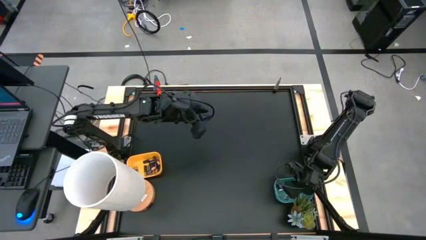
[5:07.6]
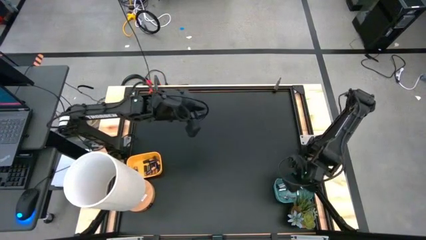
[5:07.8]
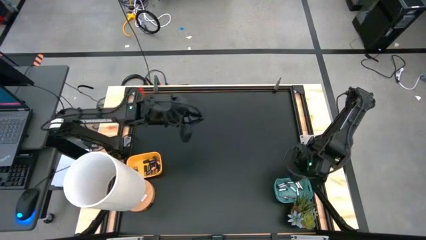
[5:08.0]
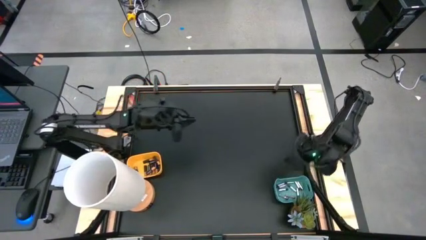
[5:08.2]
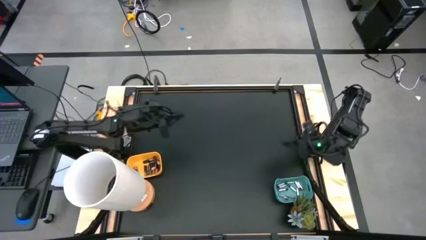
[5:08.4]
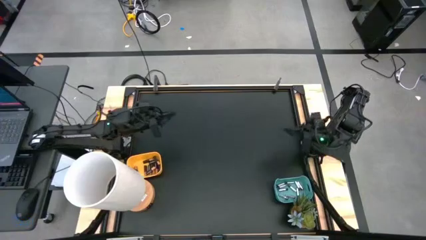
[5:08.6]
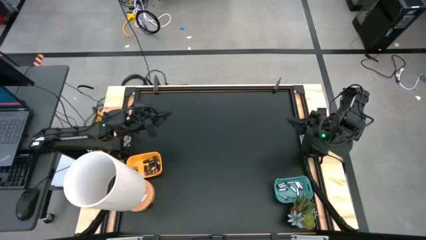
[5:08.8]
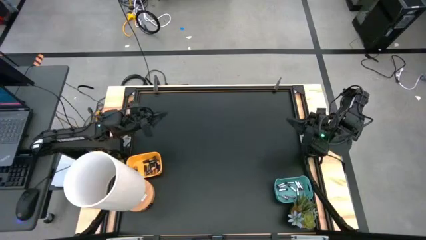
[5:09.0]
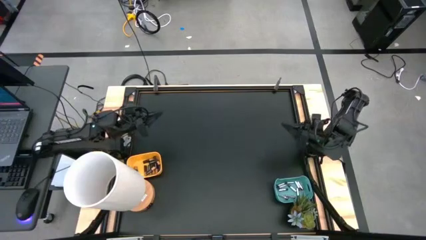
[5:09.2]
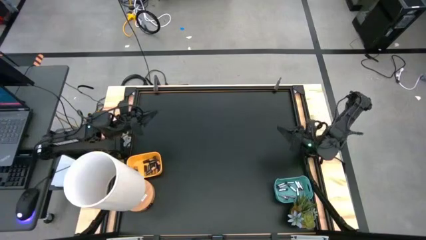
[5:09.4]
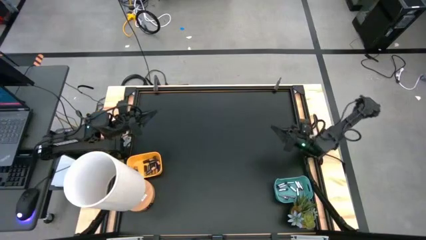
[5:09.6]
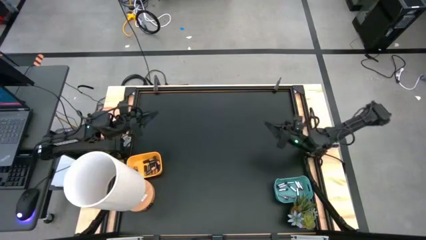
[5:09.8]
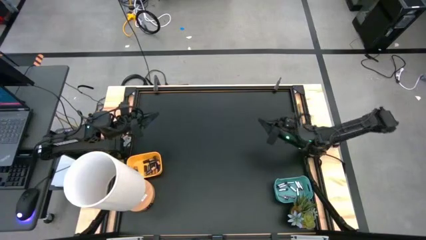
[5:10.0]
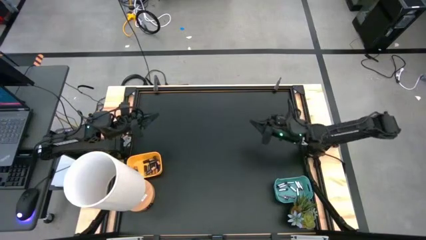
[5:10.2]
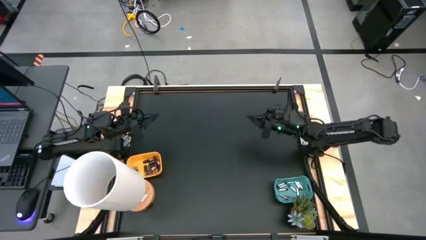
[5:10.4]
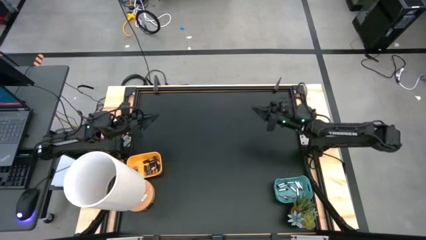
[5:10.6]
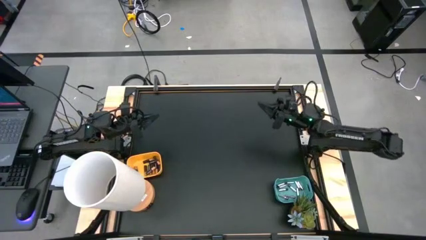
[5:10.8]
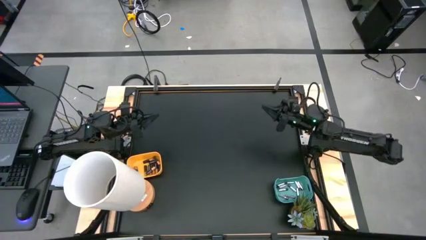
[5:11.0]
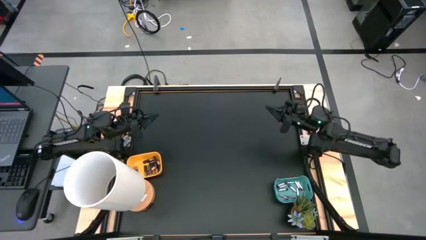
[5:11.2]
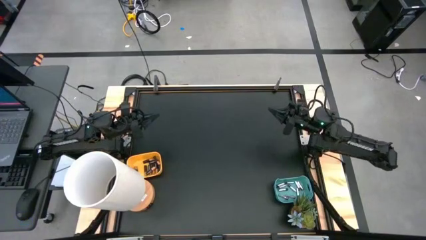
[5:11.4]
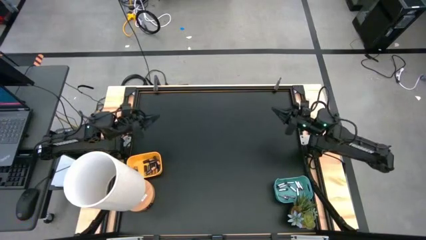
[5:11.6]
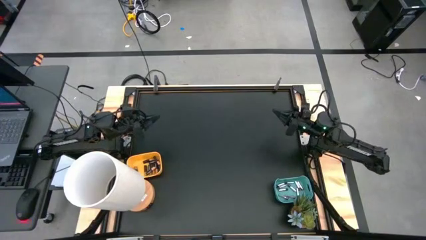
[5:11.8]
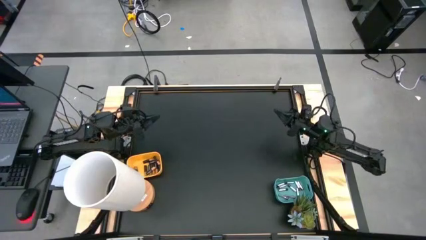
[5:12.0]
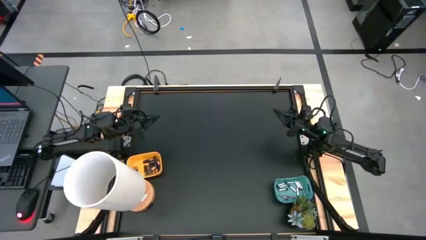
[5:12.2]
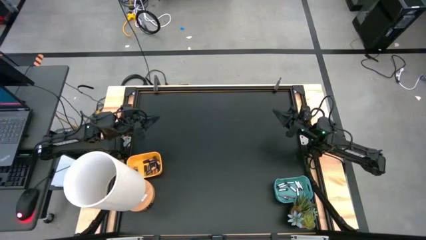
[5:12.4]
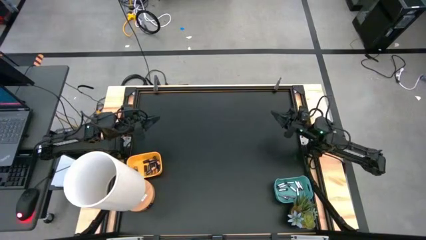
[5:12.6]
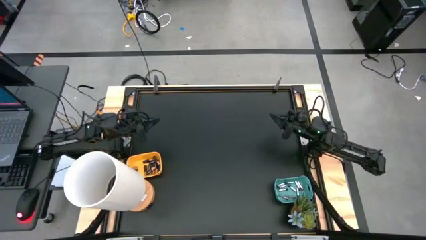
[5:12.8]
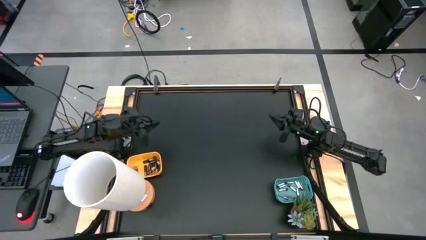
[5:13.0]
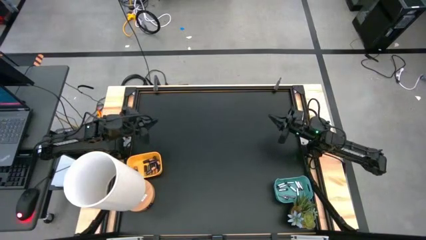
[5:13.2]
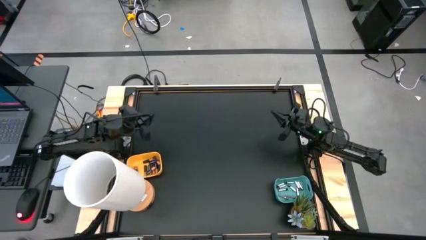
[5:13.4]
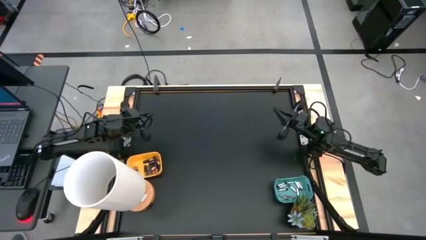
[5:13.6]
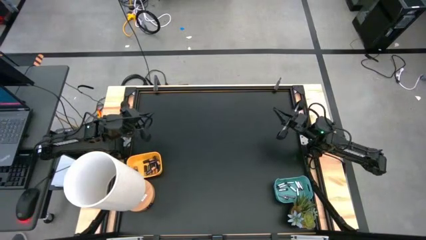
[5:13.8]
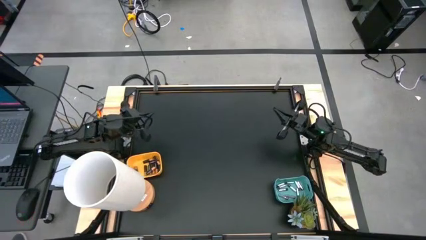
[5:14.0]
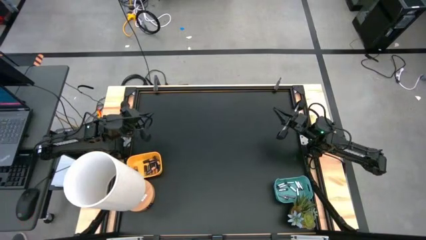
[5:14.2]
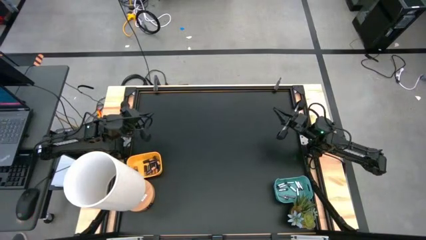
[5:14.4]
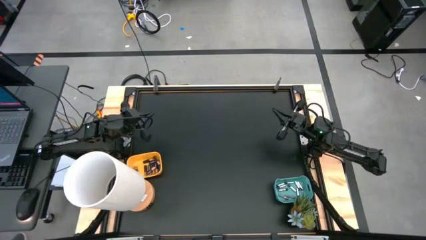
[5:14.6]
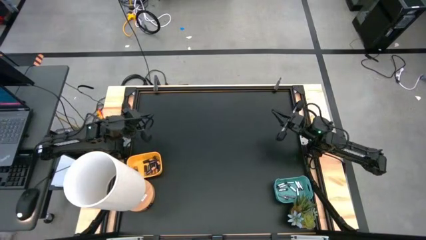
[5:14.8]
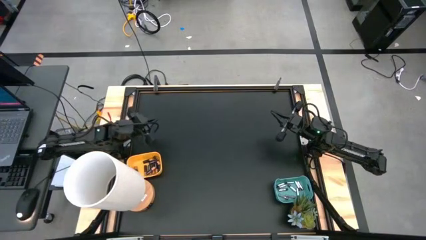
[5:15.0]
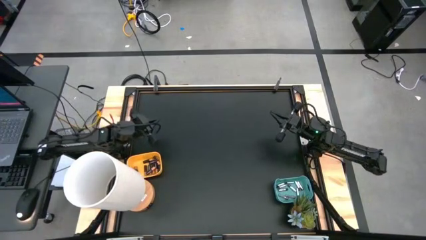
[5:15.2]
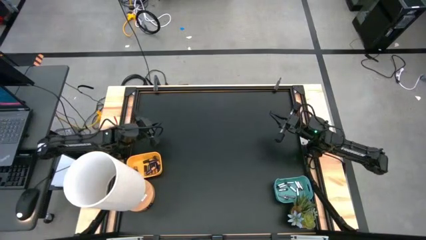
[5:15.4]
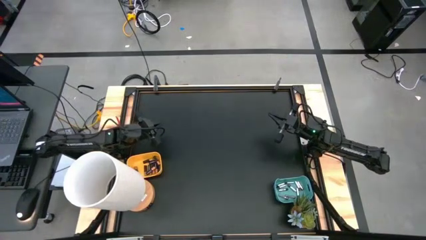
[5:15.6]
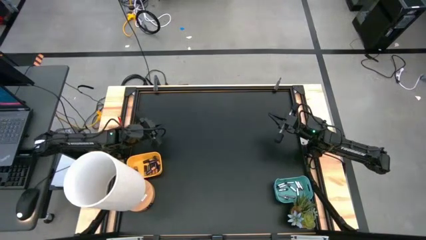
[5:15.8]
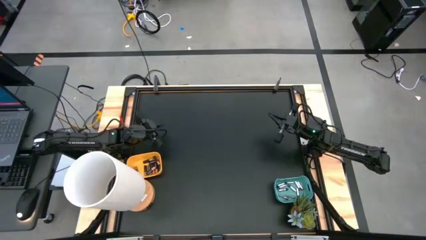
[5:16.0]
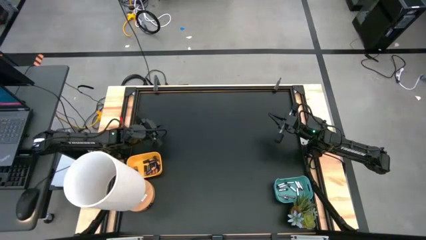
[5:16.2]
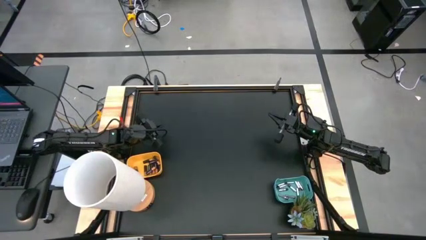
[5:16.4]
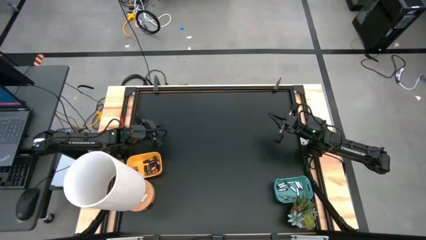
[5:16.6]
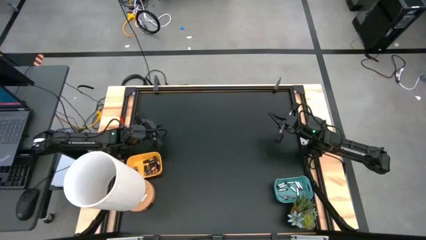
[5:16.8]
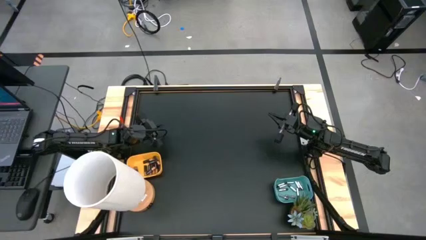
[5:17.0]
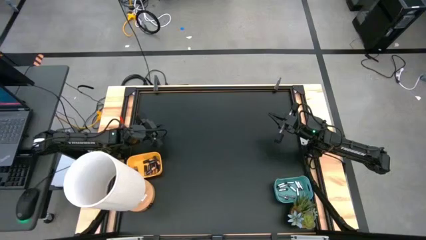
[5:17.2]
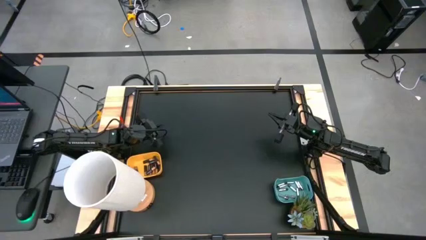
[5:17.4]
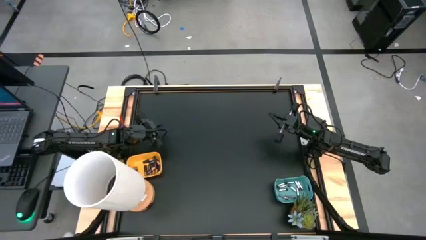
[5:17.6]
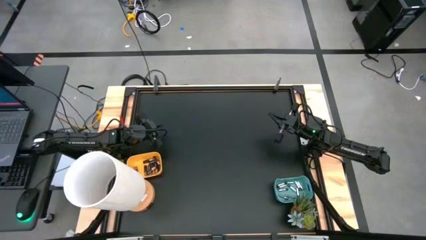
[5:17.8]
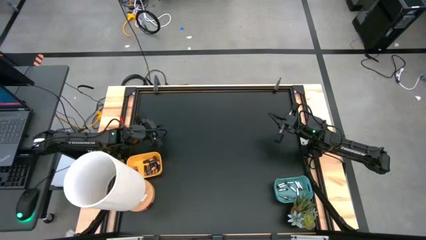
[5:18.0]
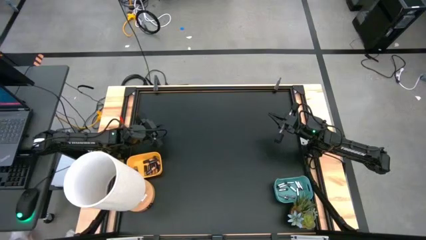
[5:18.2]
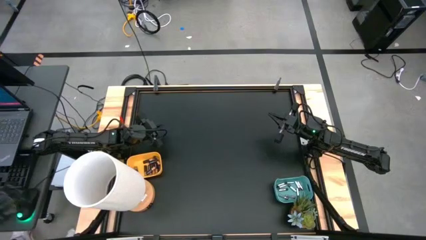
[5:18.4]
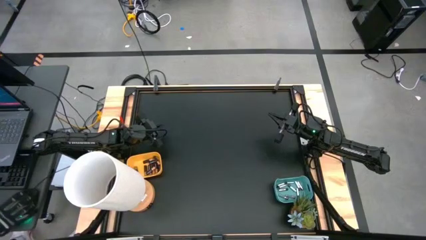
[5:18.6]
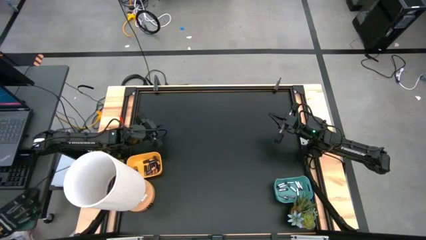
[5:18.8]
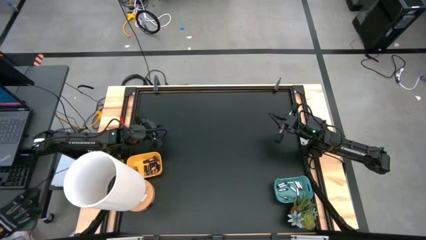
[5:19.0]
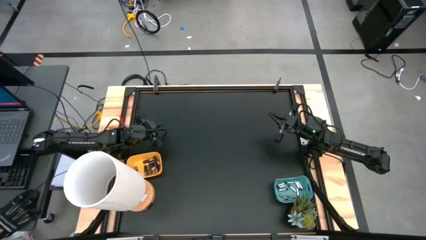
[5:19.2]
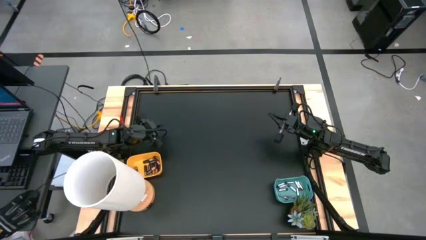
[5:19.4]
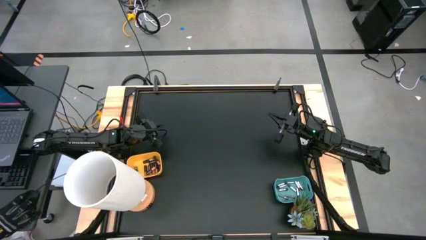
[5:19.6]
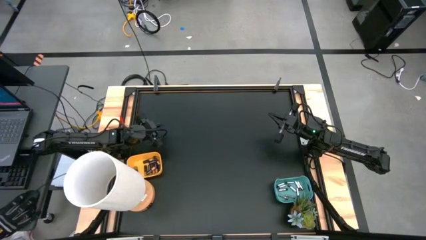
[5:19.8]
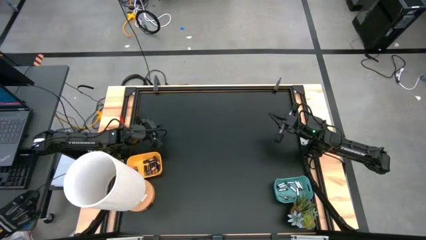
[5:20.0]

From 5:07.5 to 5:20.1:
Task: Sort batteries
Return to Home Position

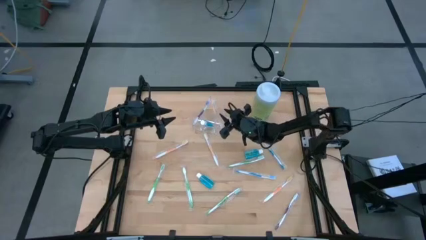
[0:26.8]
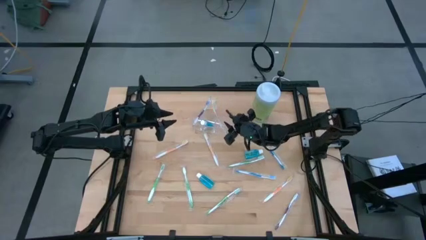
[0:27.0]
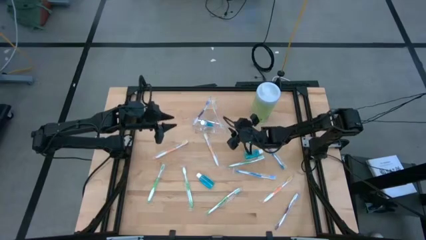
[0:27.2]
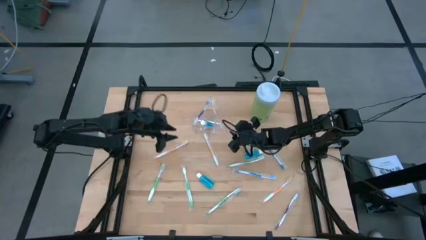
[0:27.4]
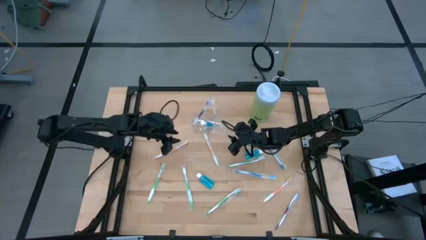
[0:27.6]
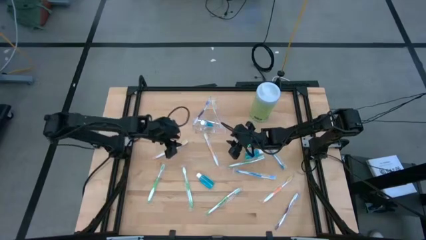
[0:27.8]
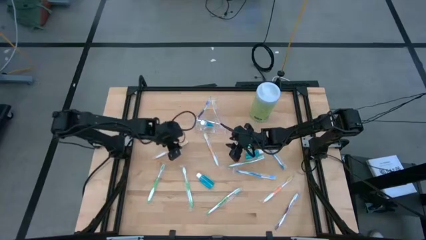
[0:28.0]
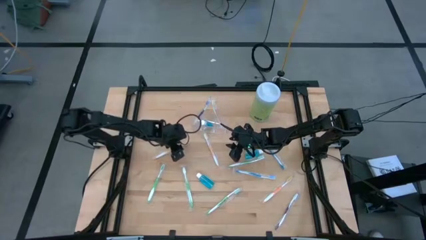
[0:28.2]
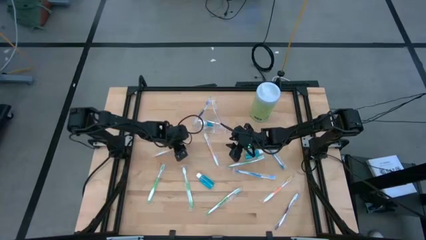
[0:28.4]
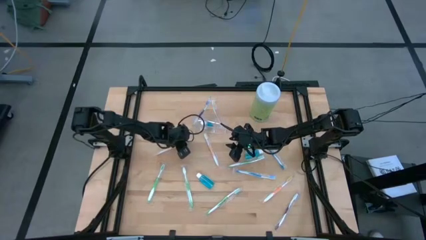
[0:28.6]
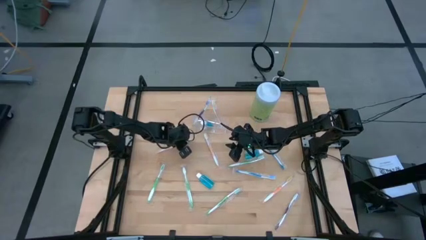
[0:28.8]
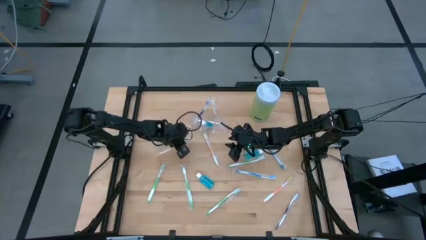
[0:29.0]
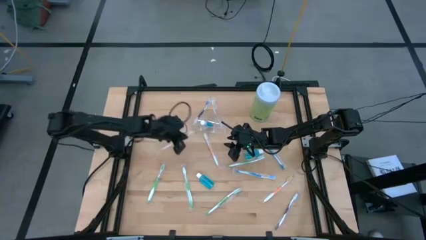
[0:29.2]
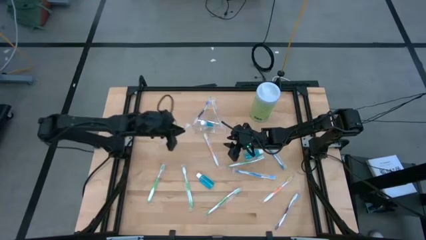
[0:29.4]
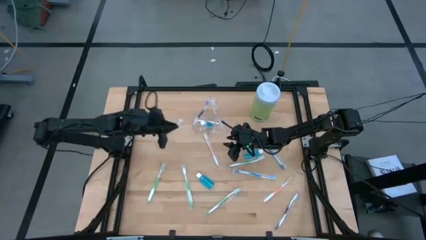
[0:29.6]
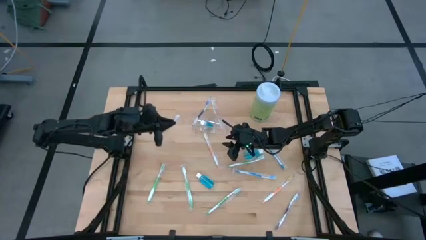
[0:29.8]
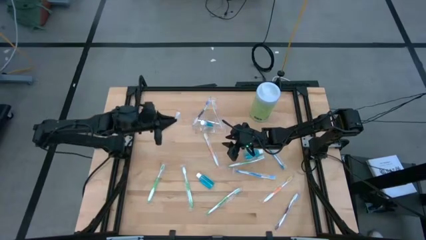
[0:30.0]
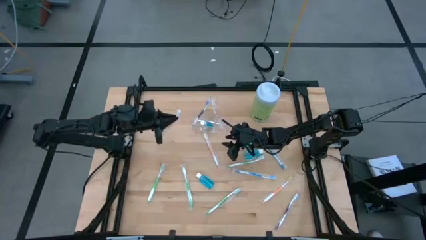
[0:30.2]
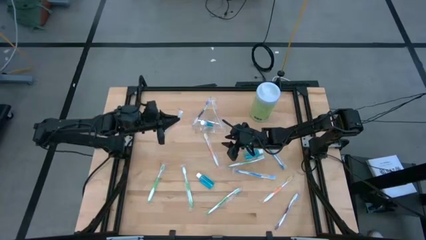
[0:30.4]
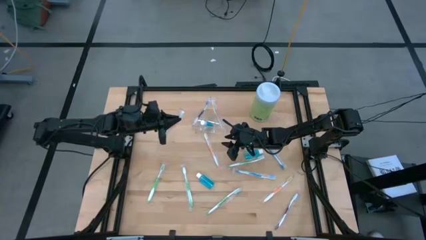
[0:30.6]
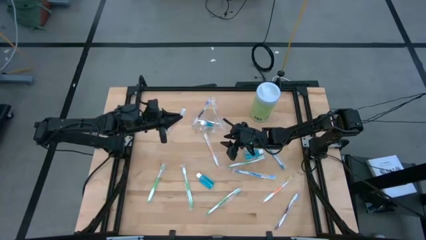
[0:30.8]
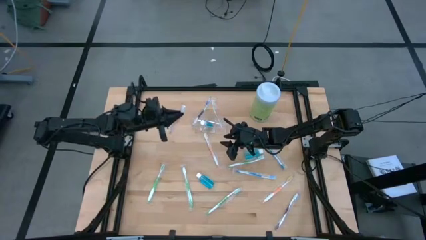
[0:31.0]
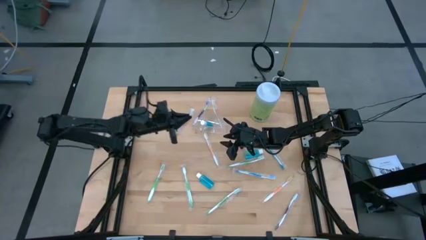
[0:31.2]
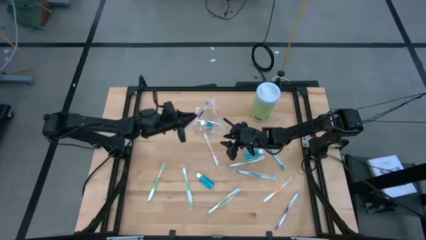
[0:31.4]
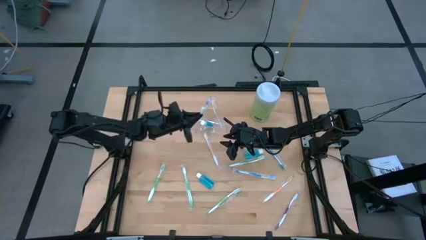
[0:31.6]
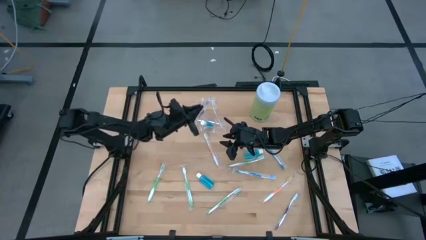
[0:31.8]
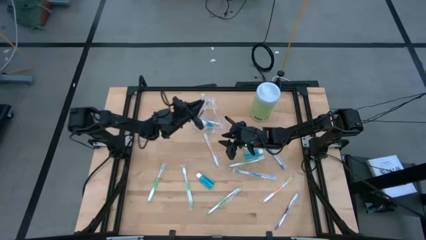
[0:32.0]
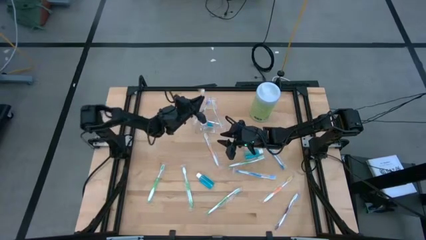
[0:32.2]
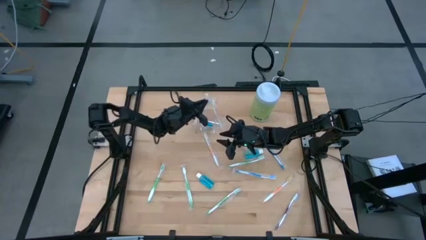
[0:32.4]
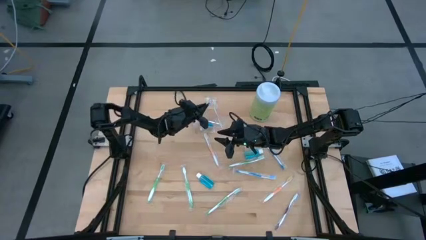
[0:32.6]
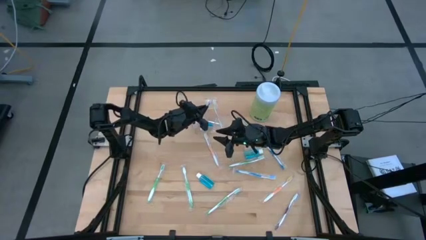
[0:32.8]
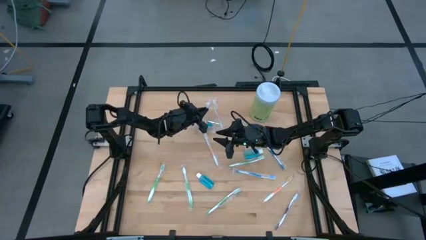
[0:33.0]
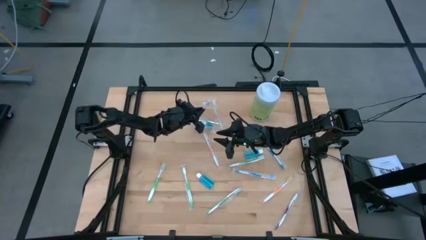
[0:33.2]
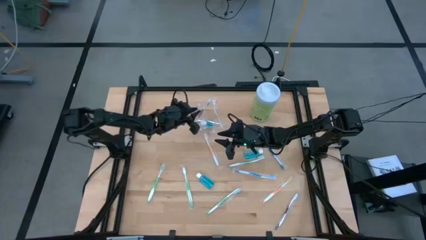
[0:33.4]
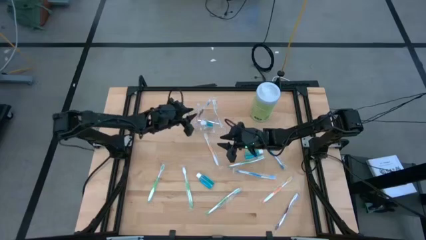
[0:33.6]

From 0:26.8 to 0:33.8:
Task: Pick & Place toothbrushing station
Put the orange toothbrush into the transparent organizer
